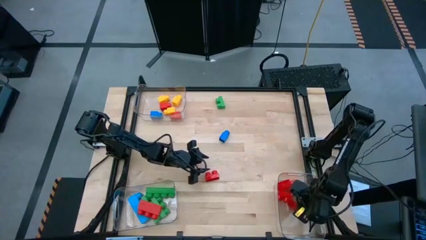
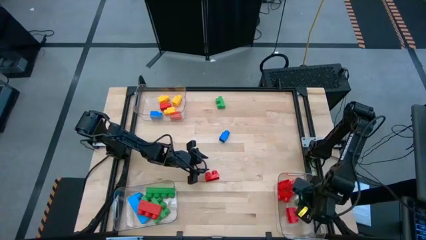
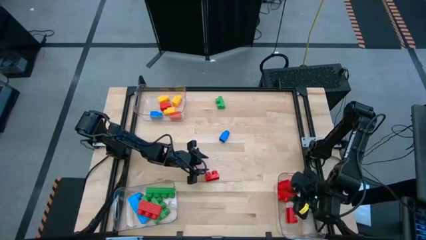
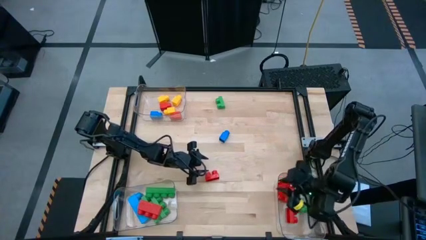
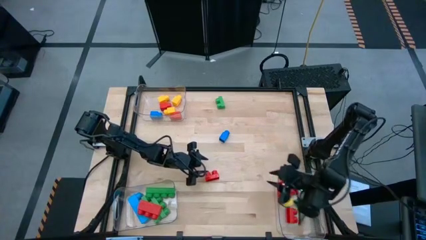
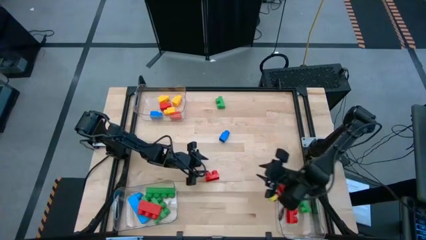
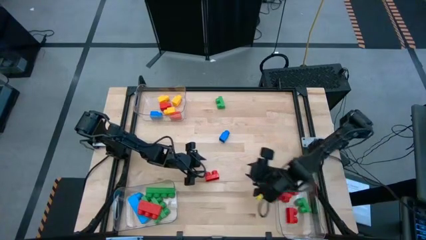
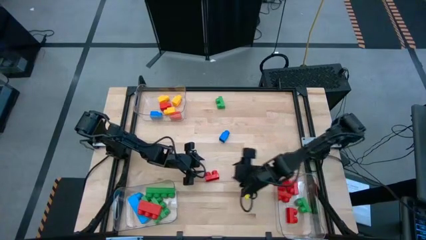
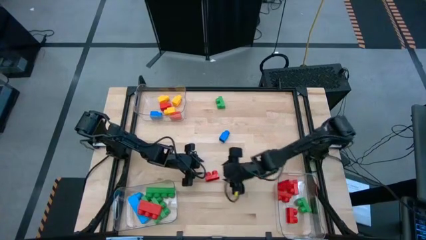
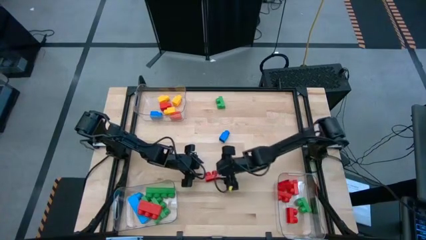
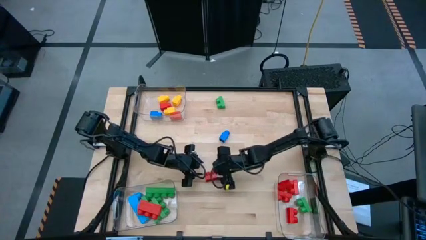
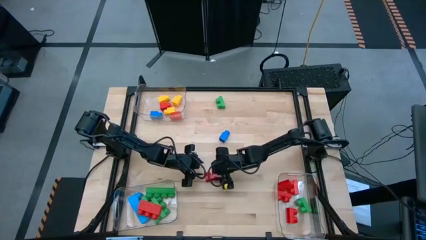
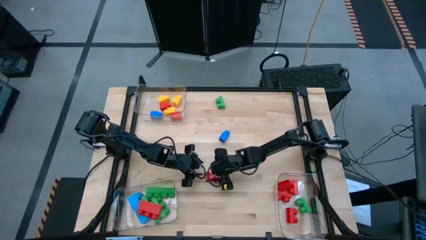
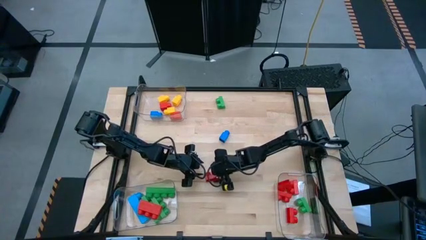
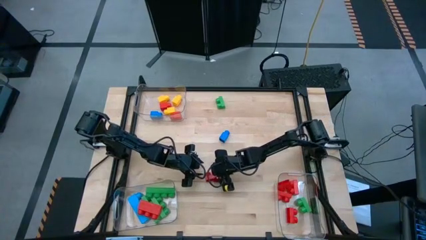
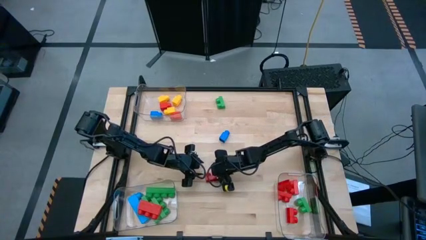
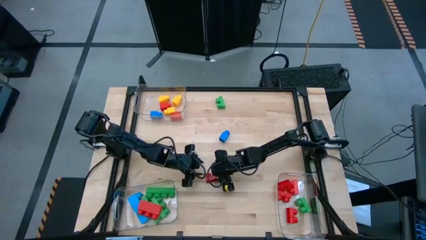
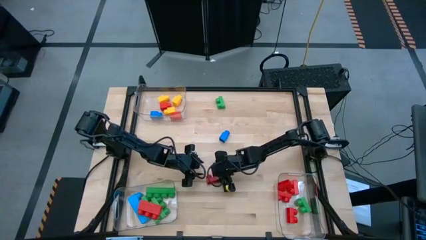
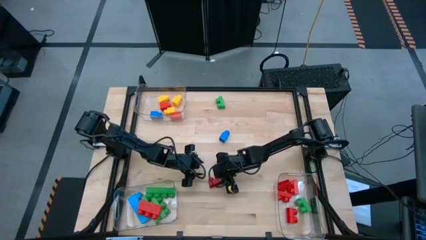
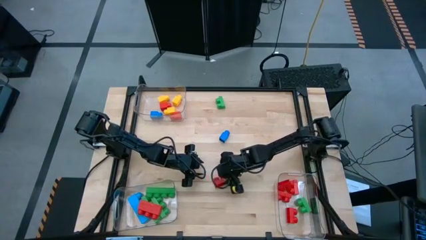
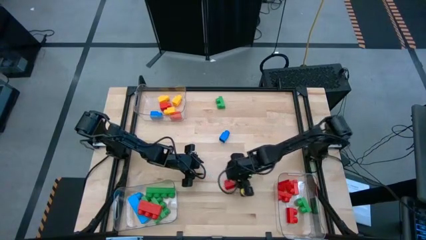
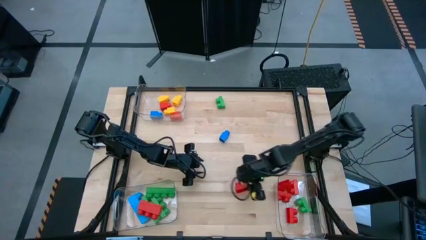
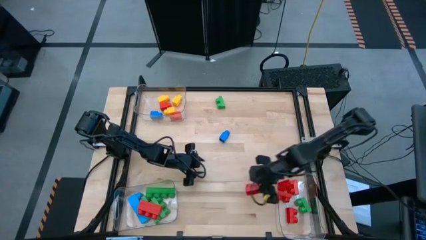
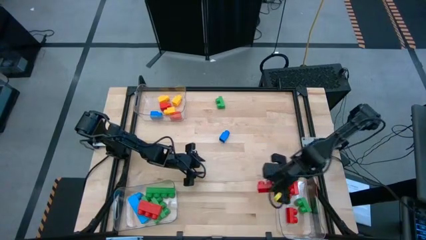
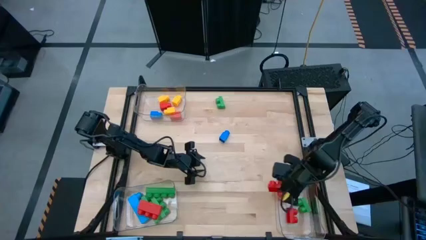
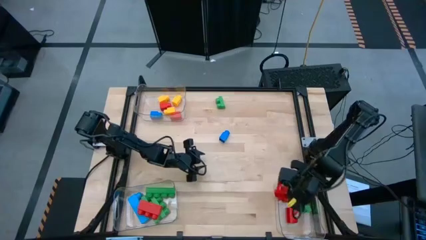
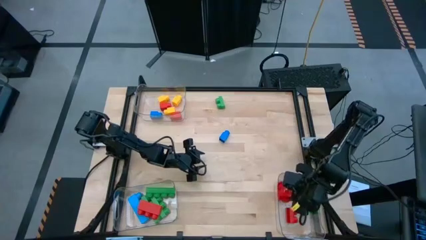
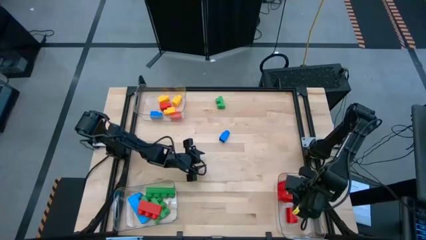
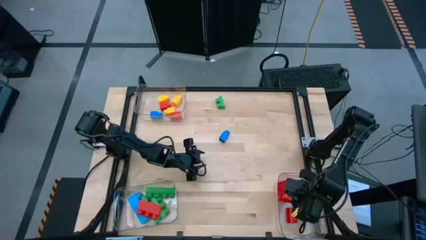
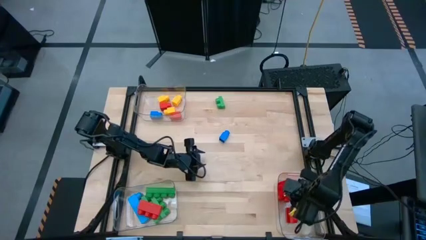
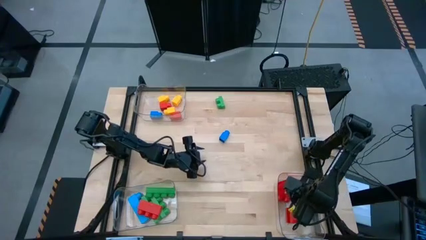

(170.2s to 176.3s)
Task: Sort blocks by size
Put the two-stud red game piece into the bottom right transparent bin

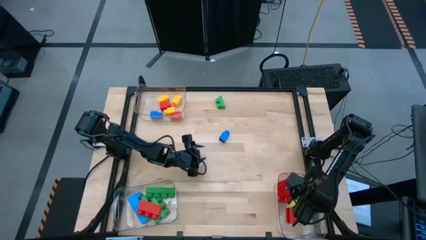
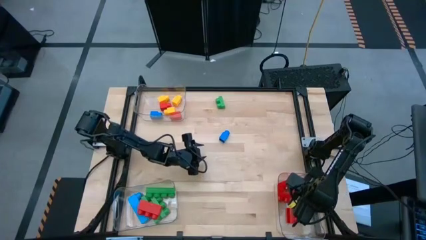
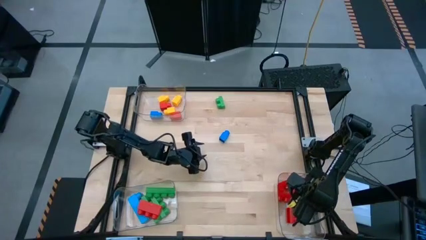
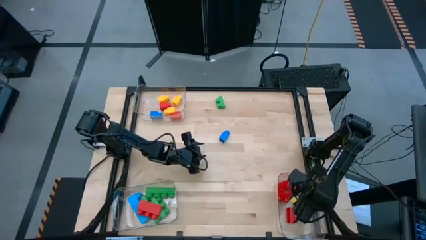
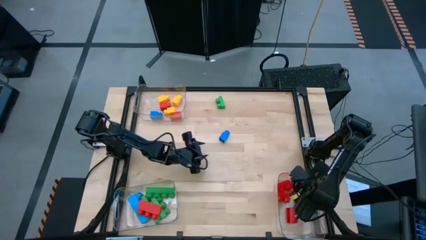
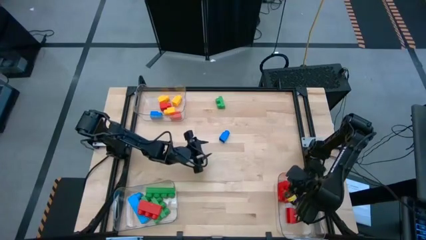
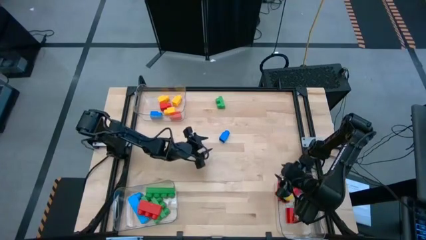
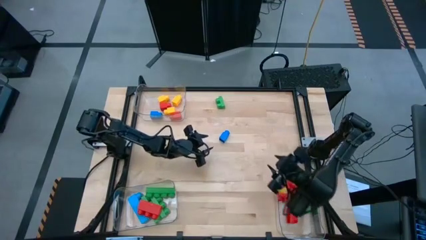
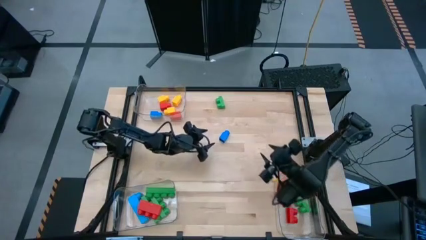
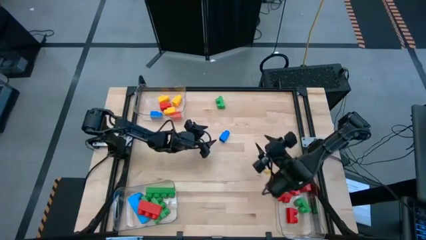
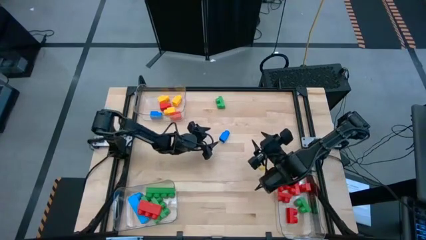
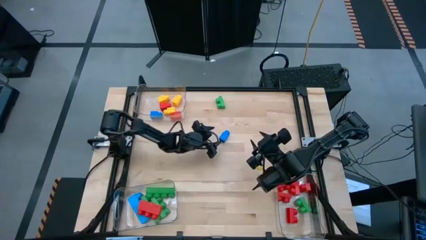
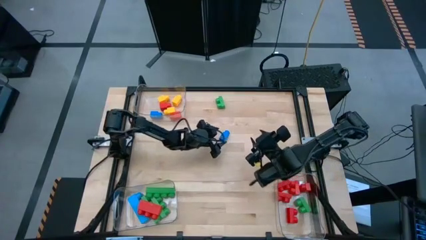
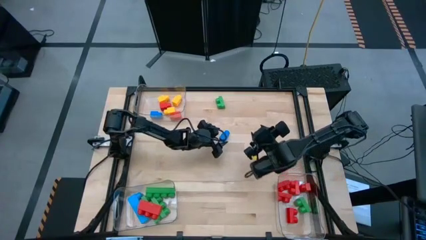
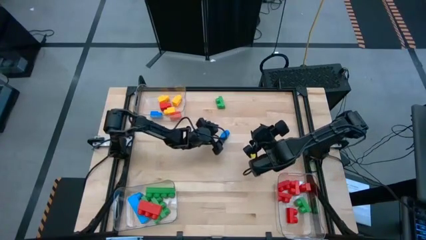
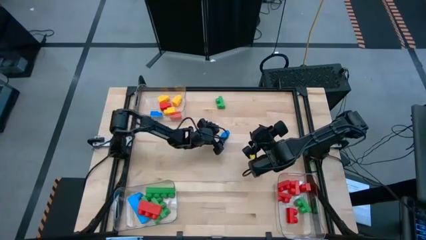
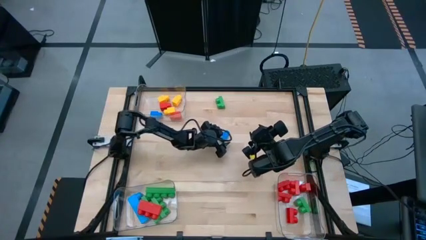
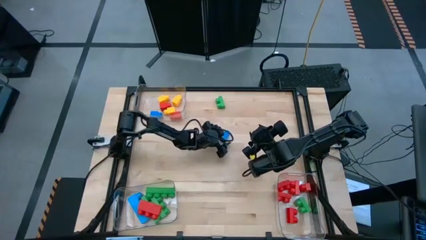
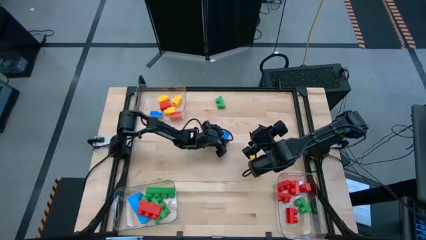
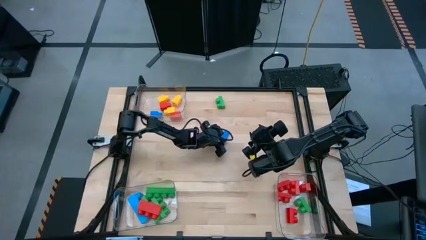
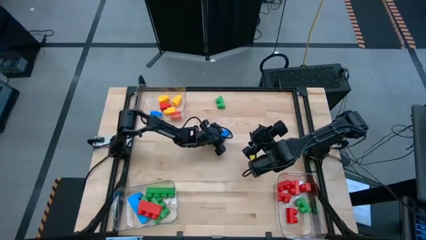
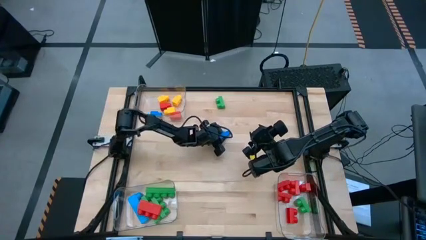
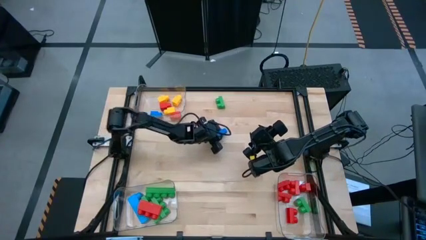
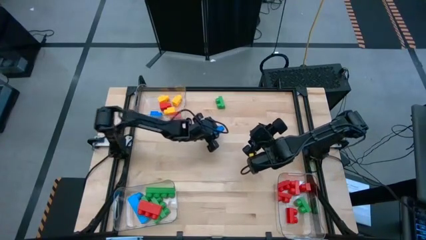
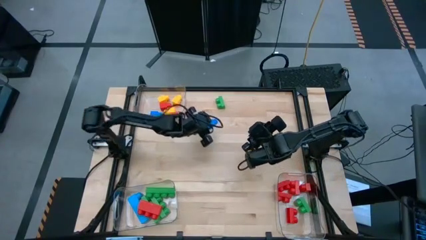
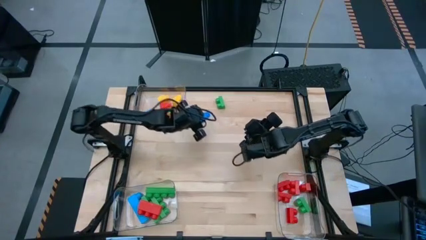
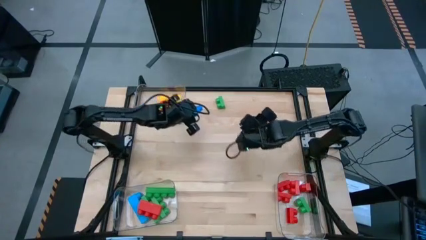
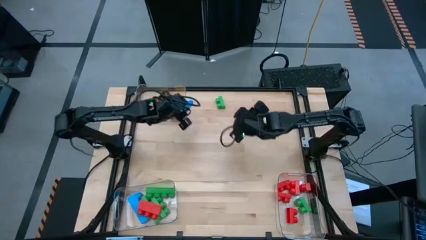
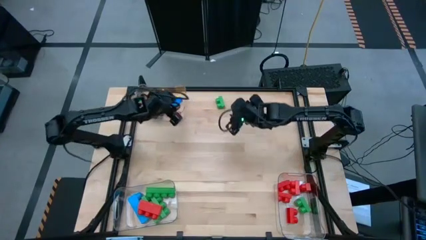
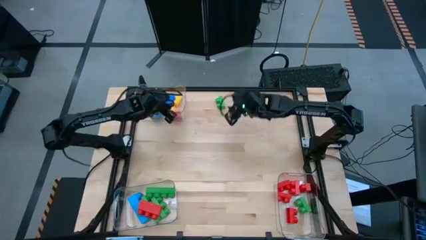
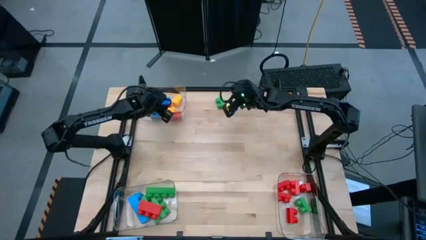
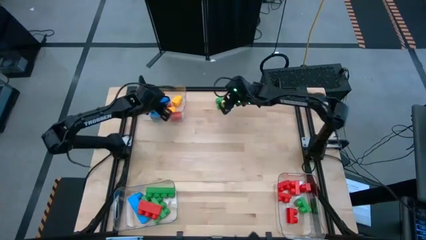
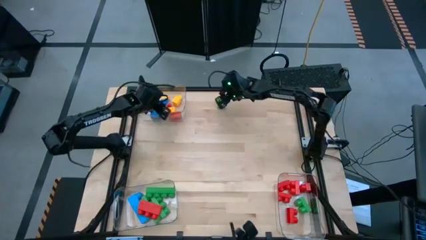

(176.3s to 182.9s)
Put the one-stud blue game piece into the top transparent bin

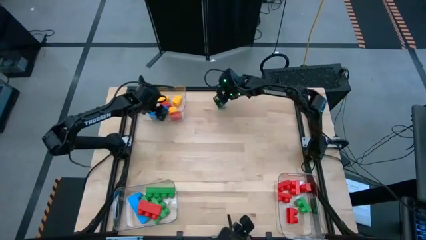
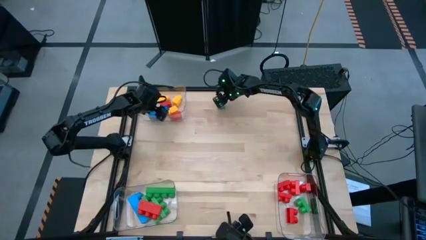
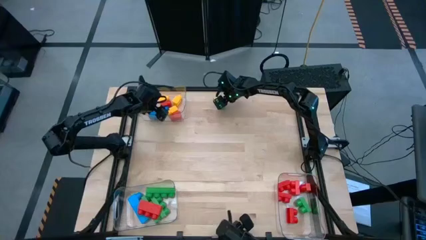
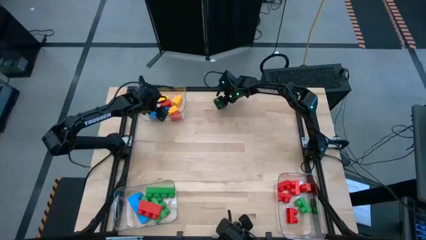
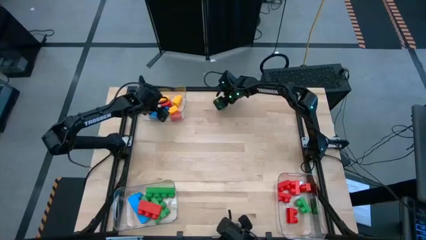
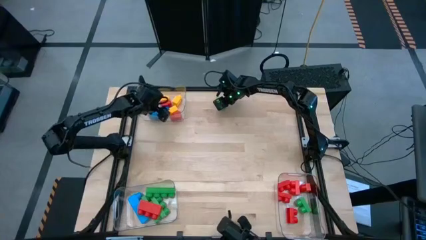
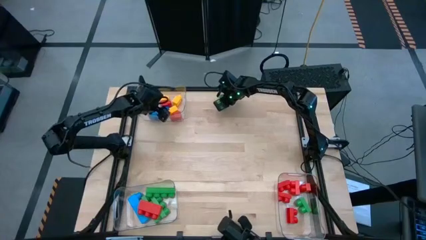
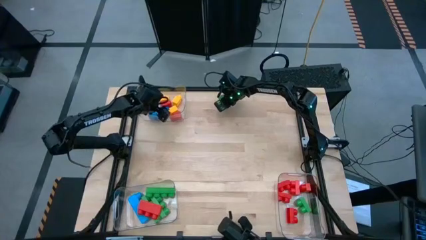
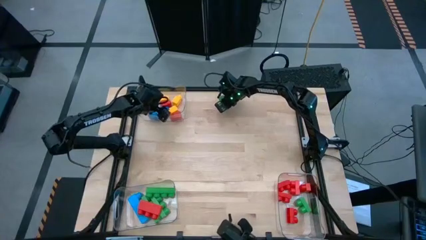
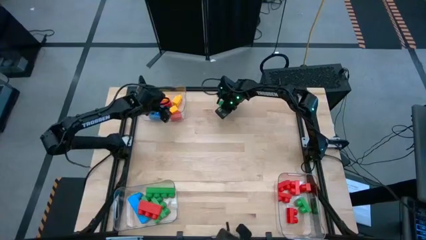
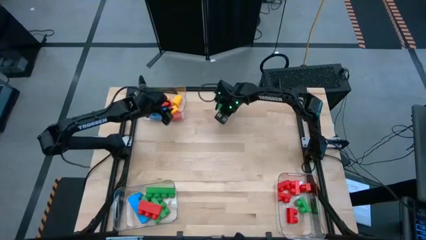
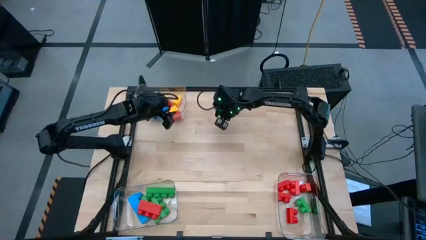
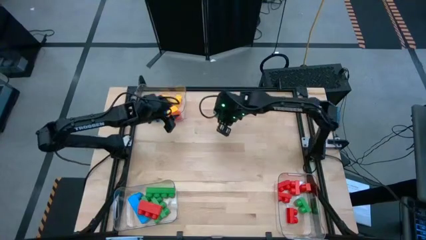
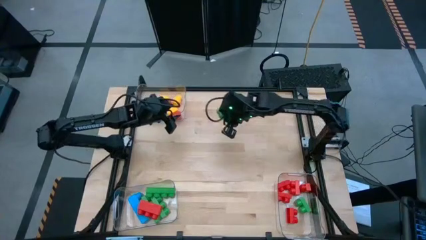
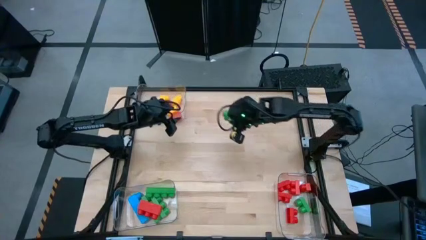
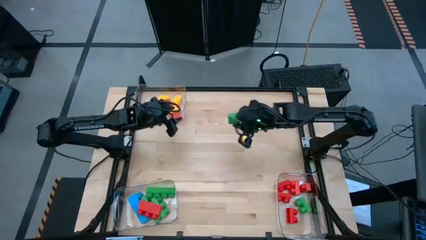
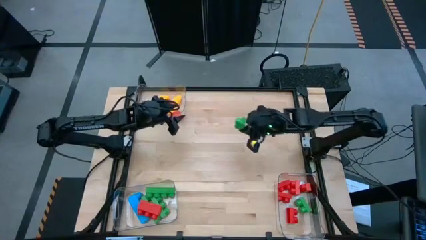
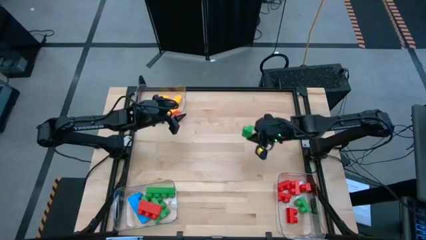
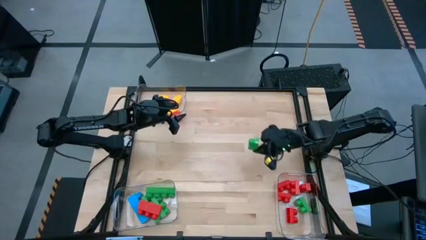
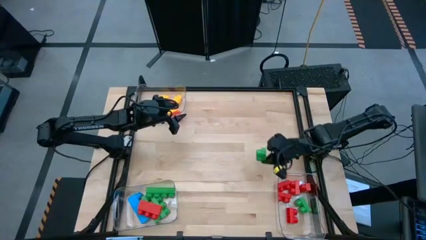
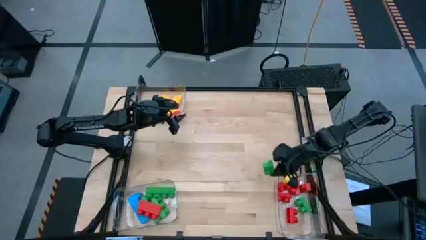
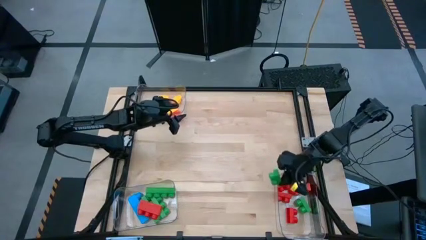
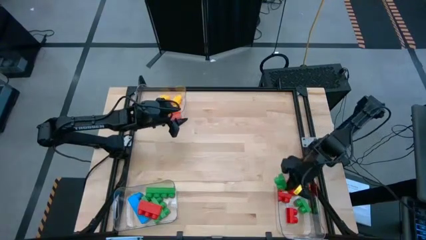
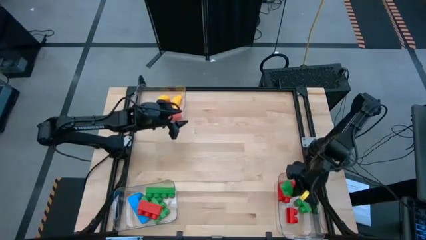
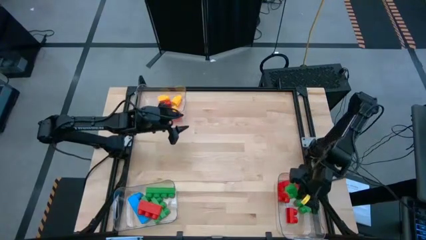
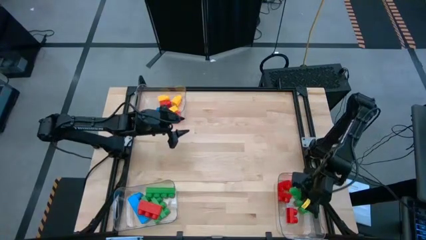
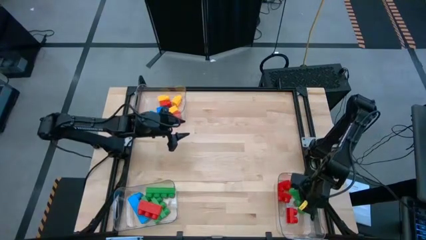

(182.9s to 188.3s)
Put the two-stud green game piece into the bottom right transparent bin
